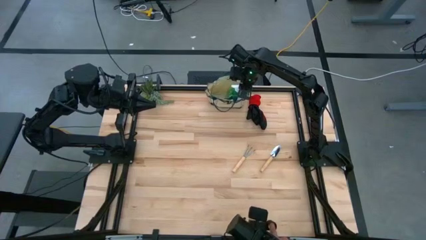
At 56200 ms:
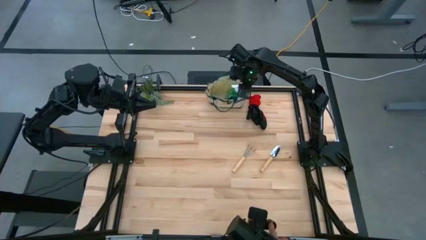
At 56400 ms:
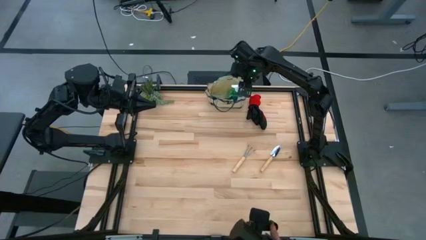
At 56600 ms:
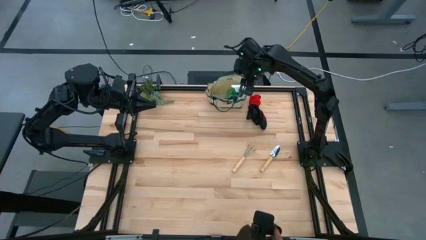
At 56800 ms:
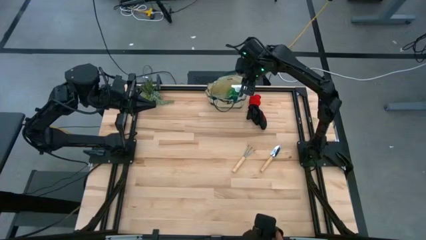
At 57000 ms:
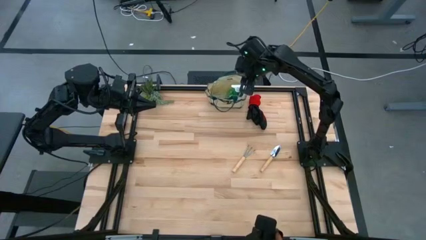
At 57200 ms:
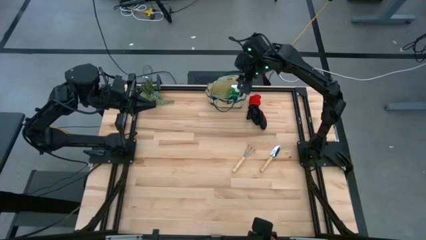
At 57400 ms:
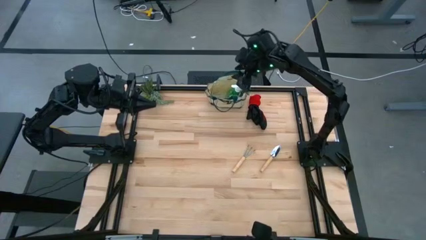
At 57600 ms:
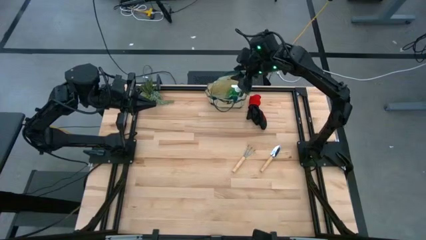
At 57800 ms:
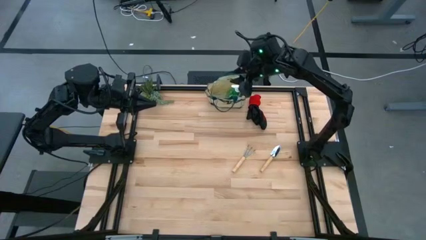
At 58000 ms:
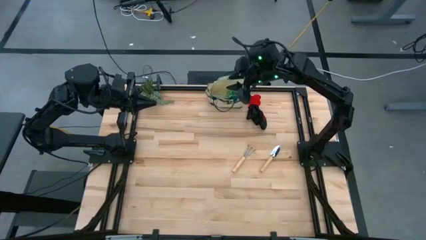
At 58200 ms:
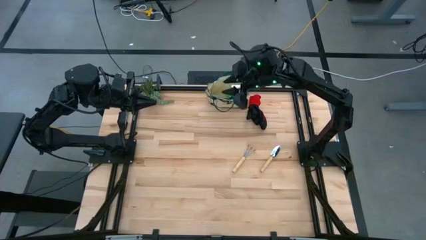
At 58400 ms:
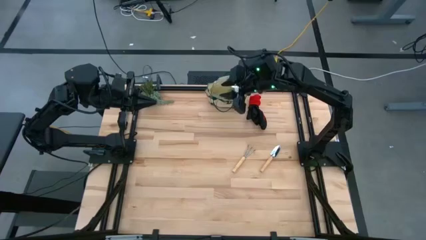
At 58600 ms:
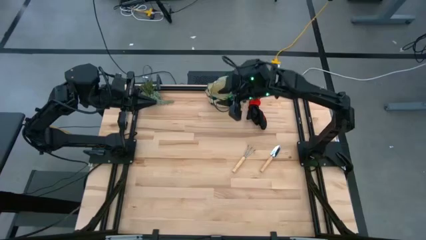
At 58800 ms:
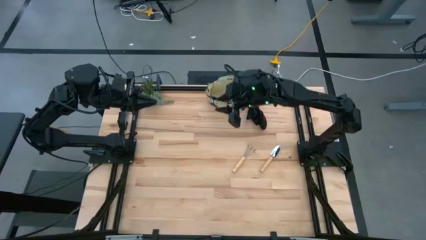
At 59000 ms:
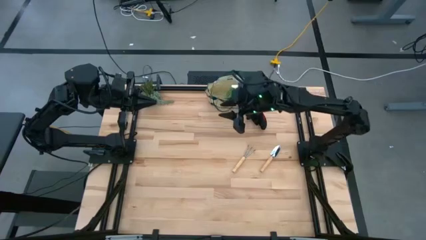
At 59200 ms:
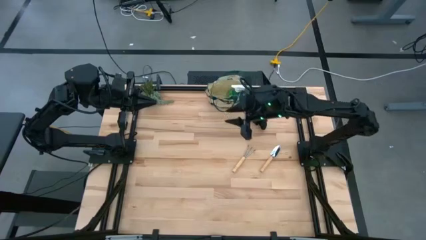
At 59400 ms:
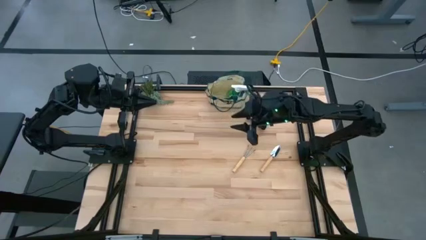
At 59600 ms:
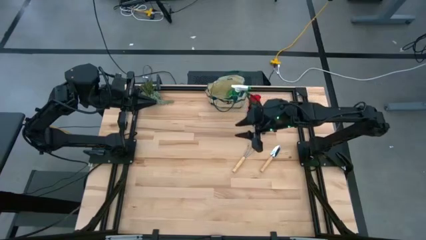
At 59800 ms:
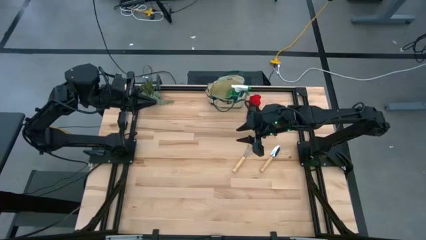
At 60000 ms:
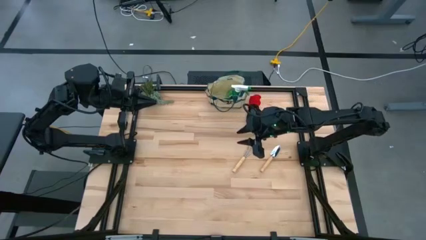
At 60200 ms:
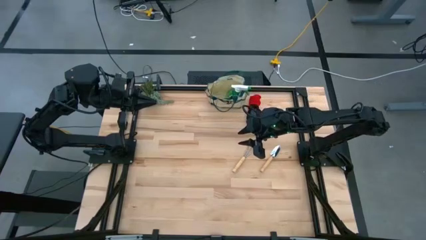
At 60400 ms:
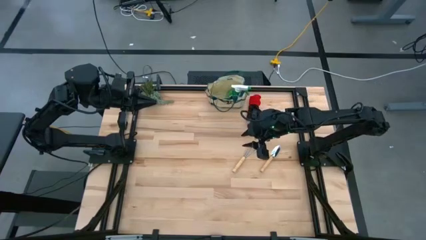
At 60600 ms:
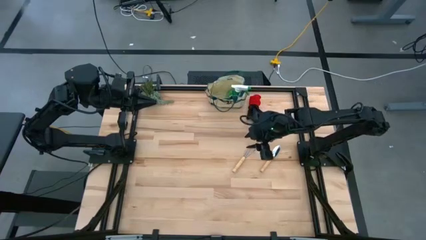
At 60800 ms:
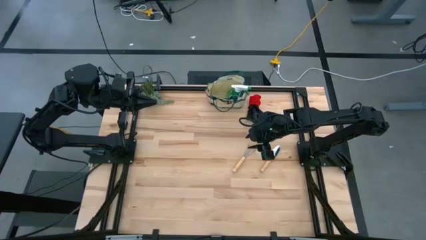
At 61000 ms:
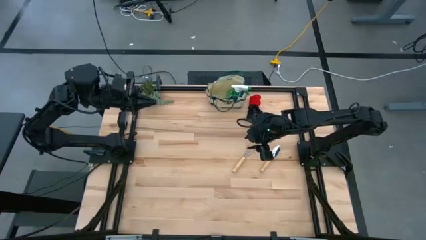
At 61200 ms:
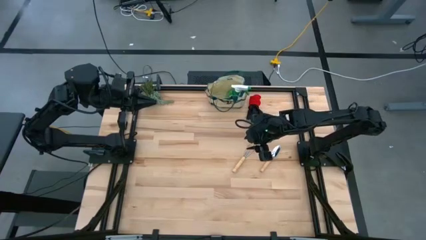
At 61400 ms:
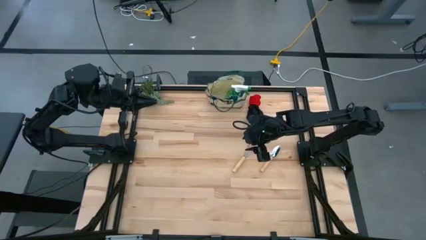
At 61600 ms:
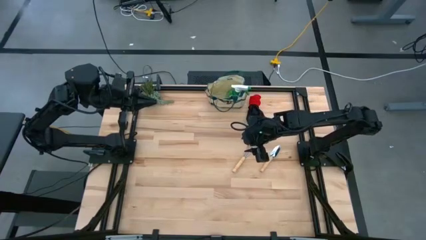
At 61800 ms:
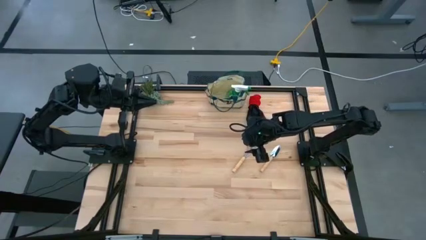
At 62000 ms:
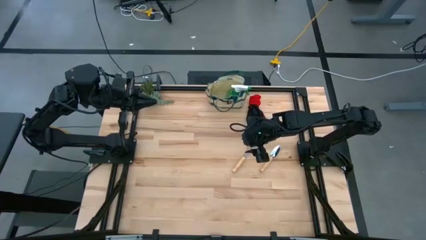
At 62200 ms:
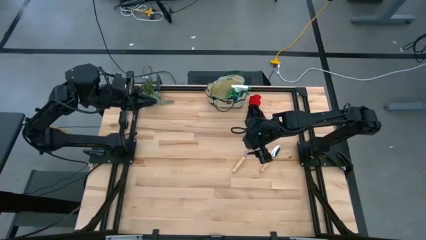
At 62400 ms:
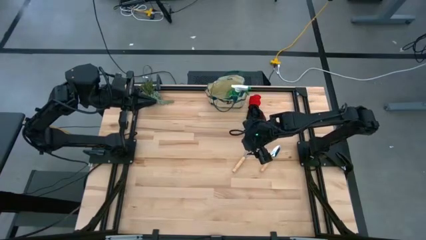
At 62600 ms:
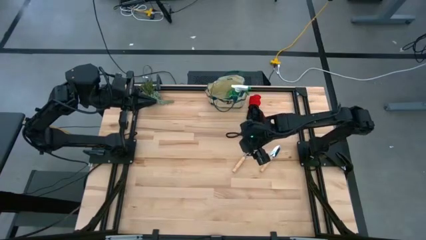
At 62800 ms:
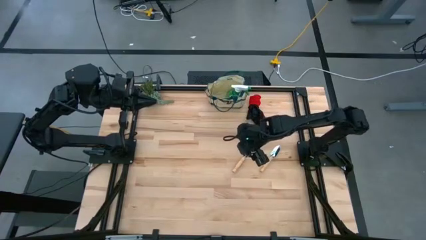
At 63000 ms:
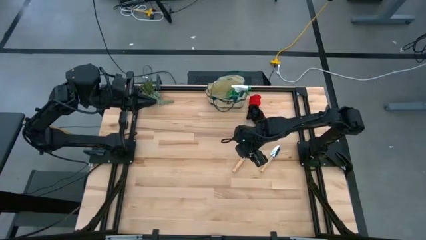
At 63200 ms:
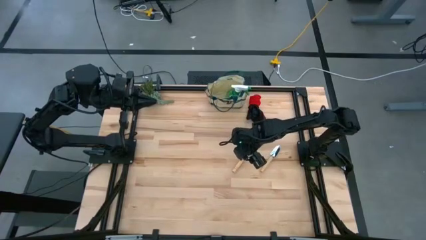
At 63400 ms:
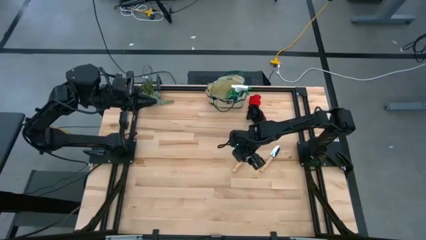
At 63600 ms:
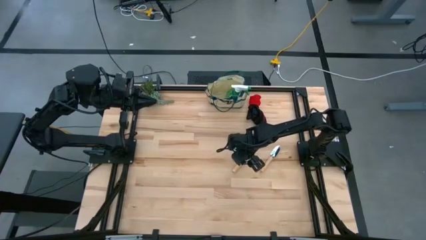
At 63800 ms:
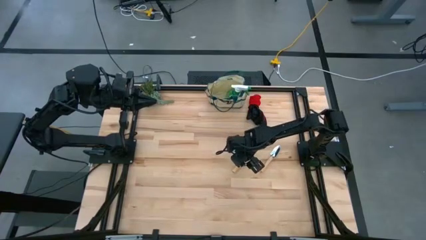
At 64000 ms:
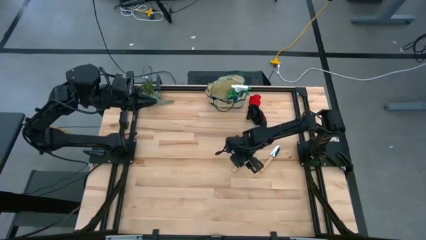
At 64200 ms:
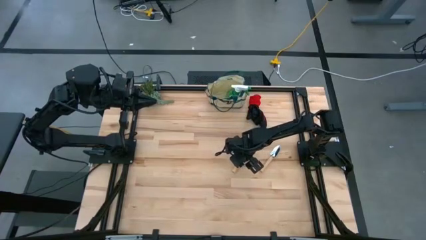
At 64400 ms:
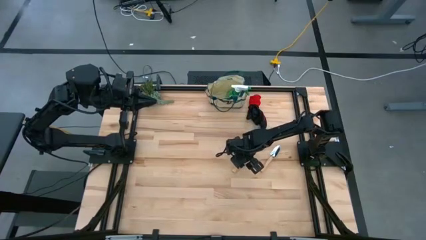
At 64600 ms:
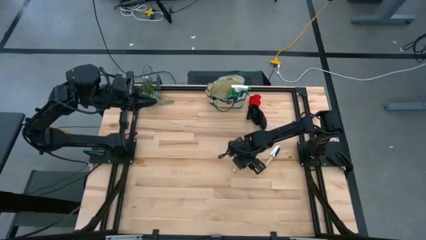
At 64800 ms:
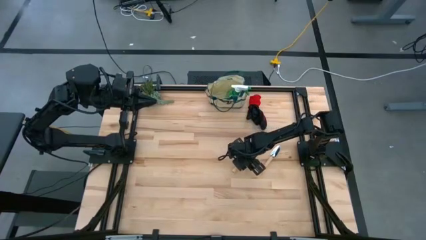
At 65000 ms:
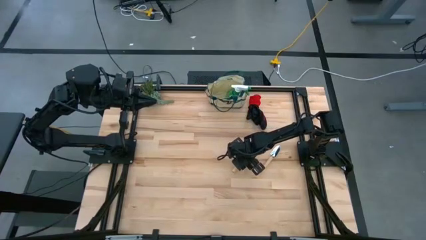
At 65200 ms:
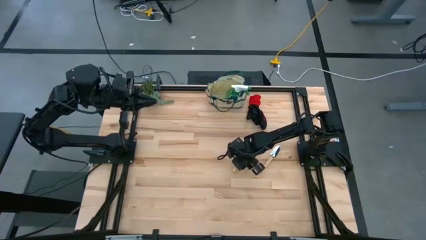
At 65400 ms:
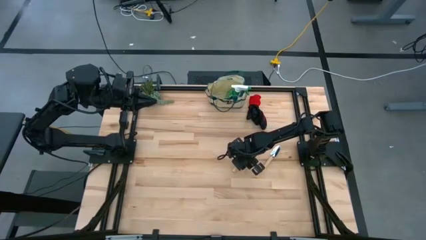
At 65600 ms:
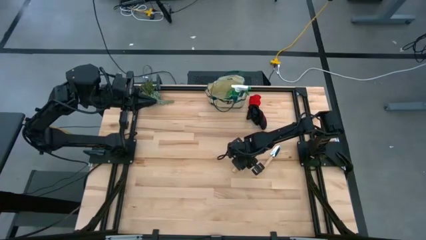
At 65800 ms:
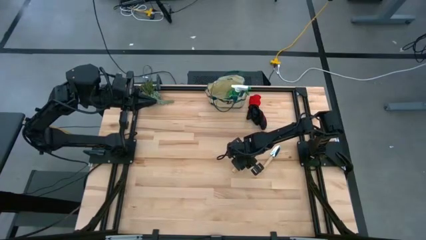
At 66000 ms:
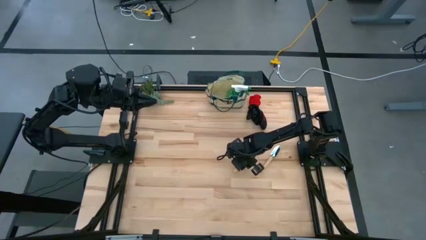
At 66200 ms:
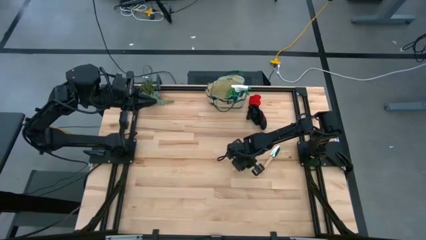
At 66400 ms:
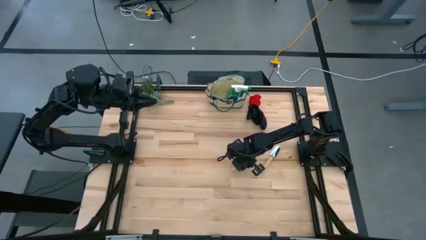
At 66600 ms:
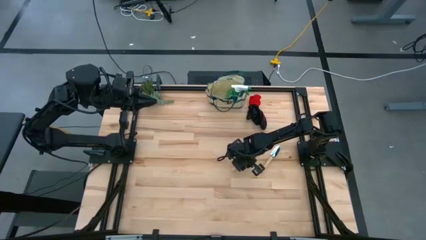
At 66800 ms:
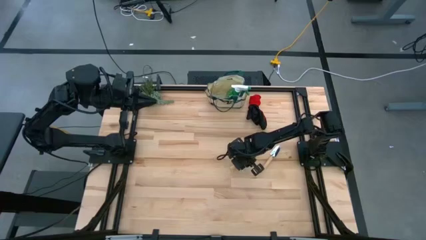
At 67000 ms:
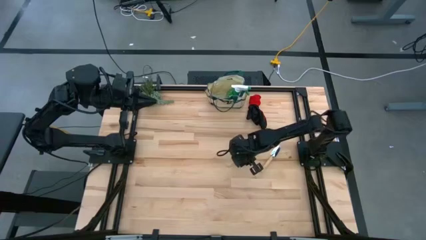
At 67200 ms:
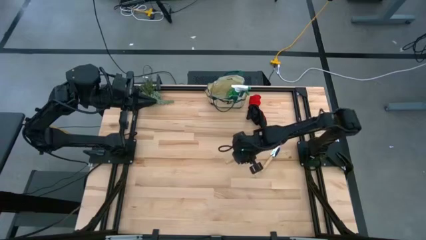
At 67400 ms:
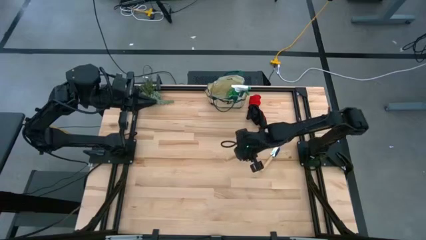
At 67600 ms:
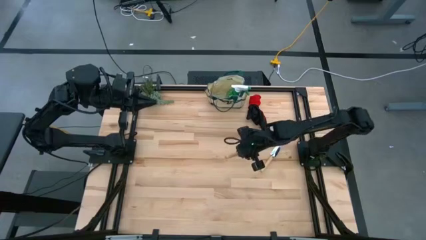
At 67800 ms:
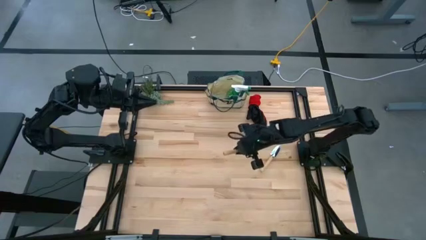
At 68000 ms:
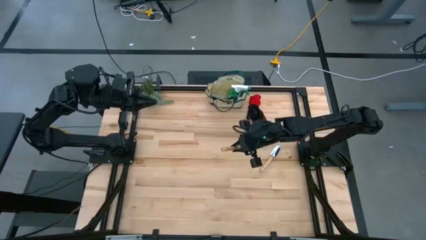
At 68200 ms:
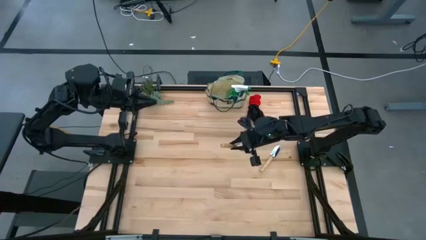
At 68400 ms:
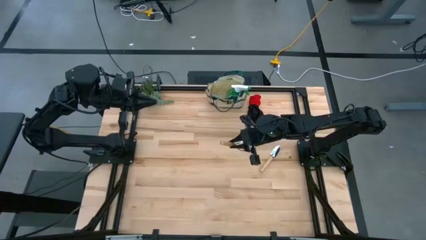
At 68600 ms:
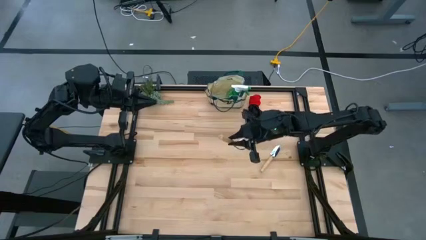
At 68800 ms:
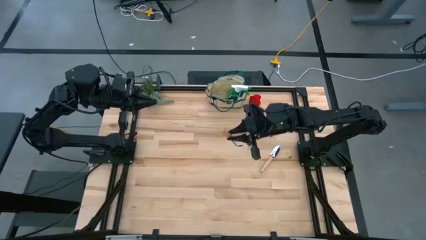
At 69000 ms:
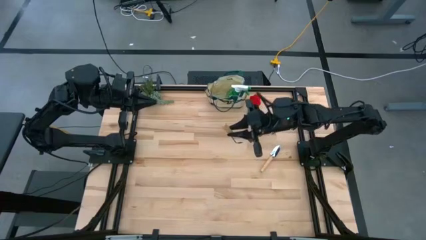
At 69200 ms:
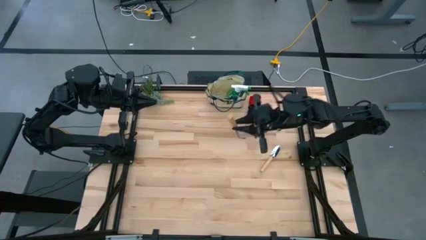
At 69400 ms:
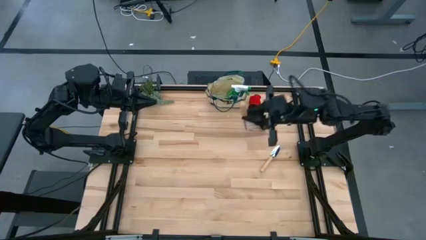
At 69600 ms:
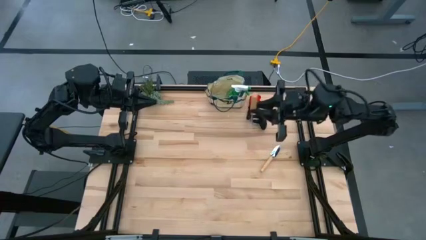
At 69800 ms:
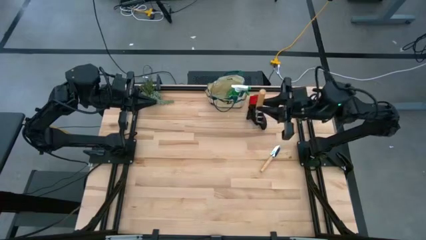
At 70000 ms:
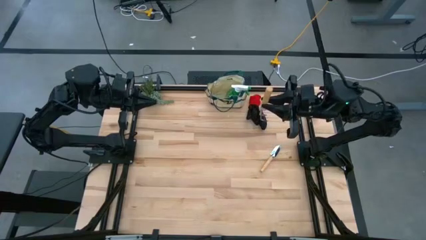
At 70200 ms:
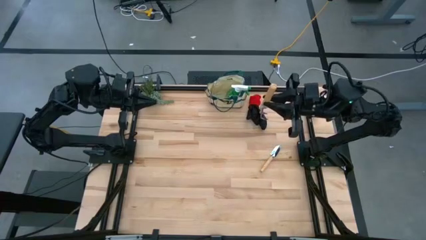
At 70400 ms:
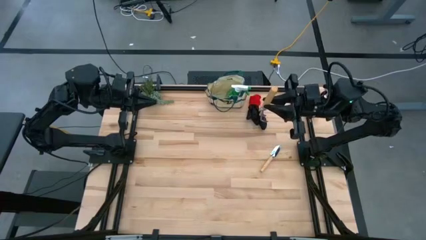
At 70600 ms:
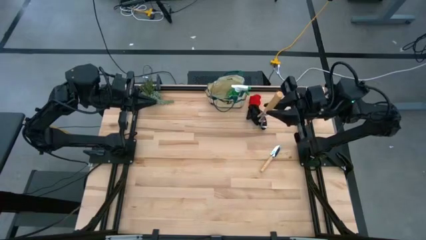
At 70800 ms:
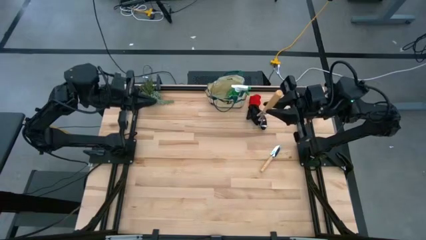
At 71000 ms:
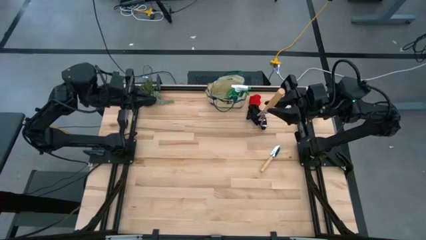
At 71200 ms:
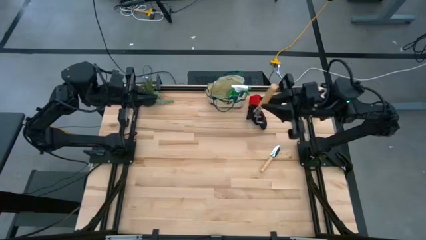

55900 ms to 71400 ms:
Task: Pick & Place Garden tools in Gardening bag
Put the brown hand rake into the white gardening bag
